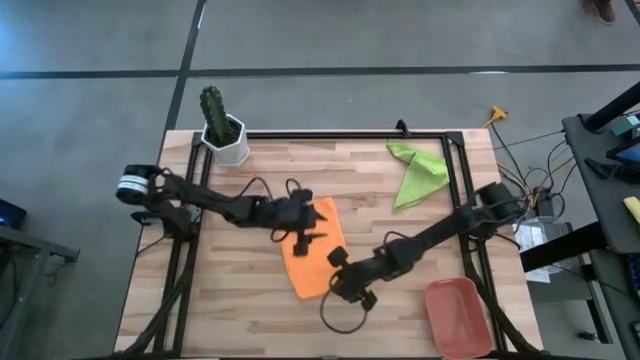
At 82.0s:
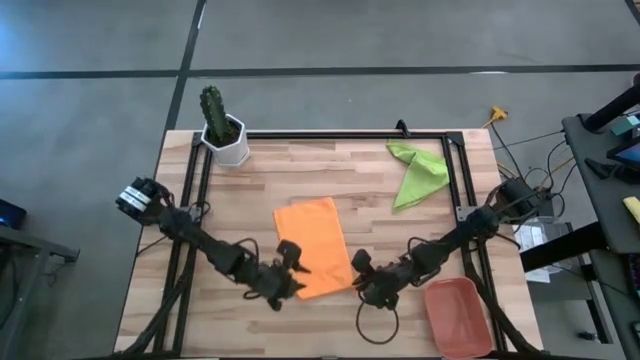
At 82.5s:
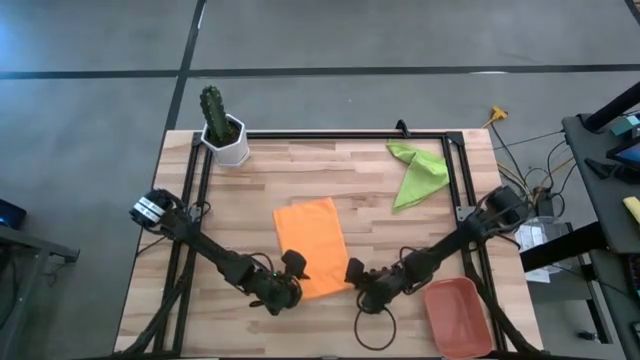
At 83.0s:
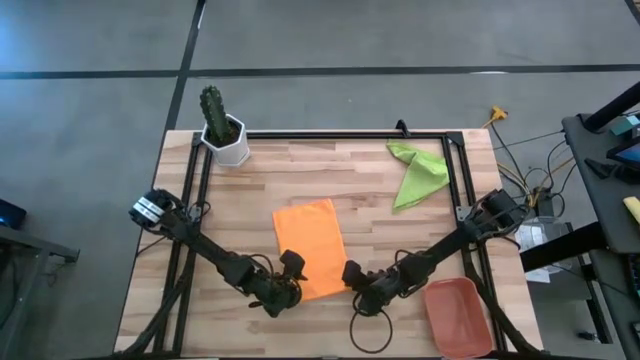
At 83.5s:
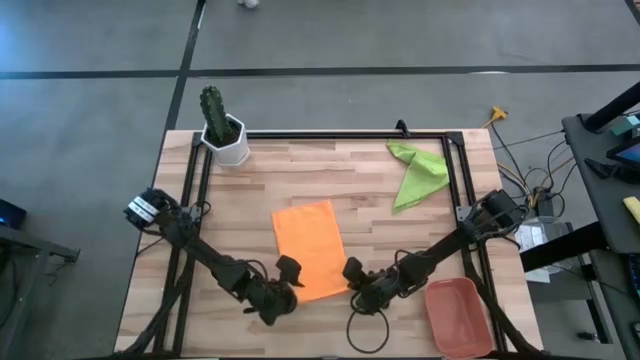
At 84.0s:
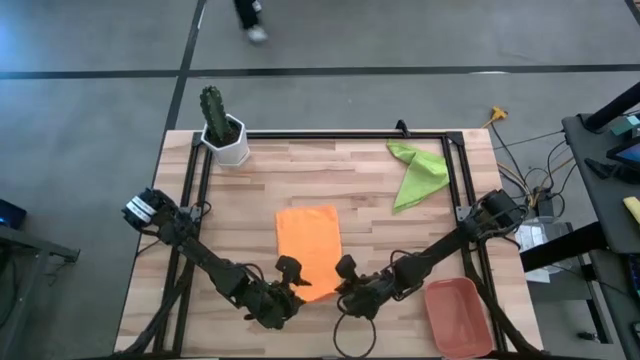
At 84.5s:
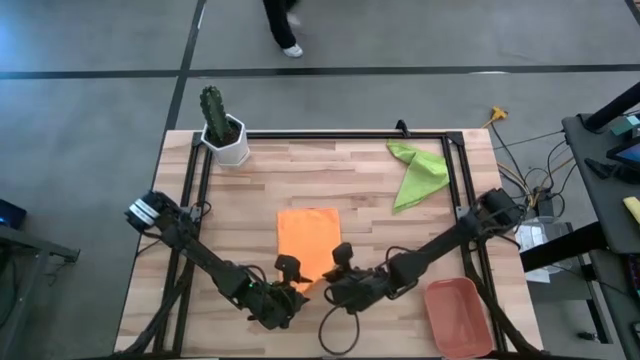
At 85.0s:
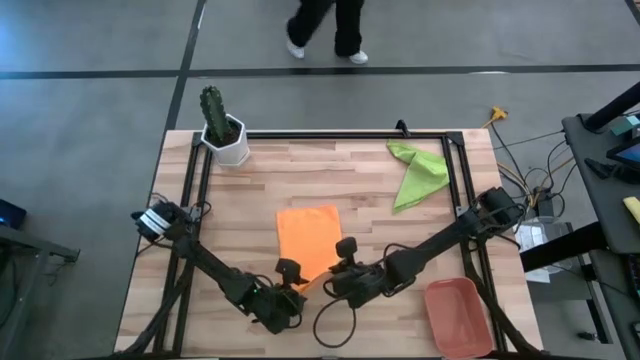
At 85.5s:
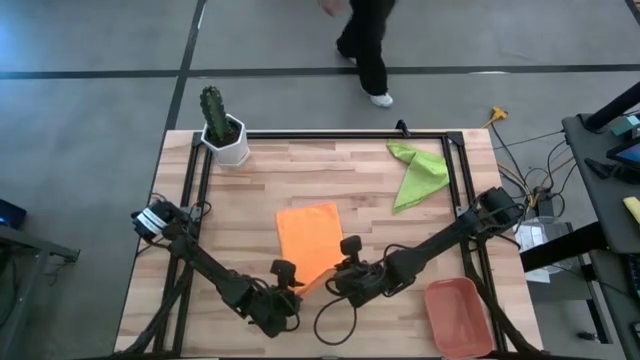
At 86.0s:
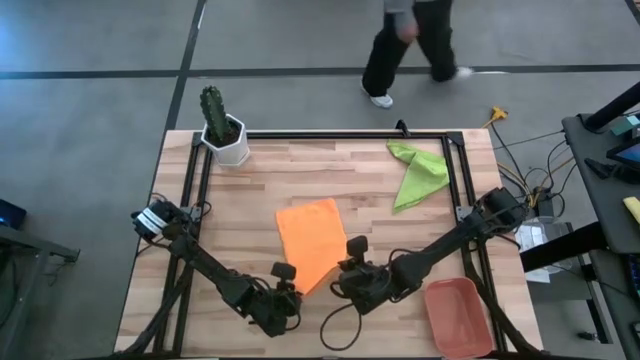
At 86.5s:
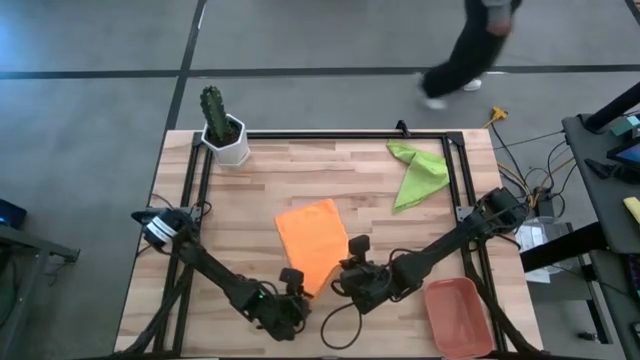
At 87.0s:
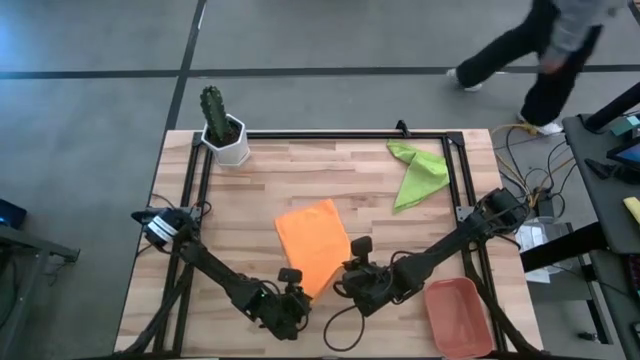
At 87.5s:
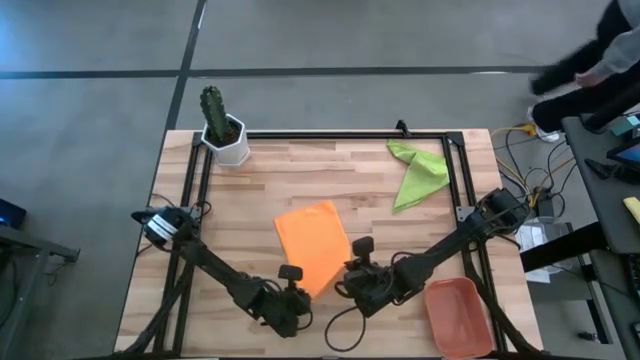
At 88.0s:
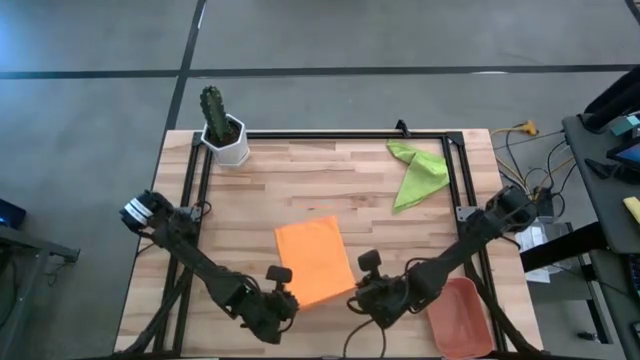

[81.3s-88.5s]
Task: Roll microfiber towels into tight, uniform cylinder then place into a basket
Fold the orange microfiber cloth

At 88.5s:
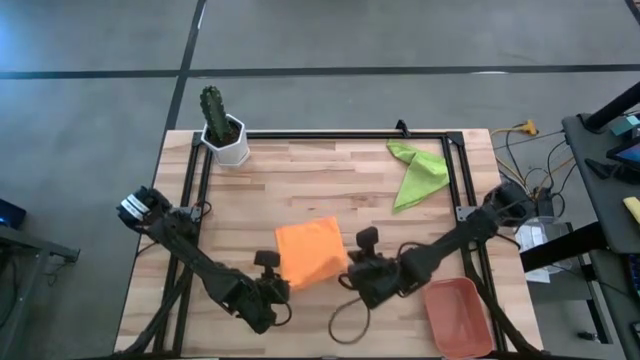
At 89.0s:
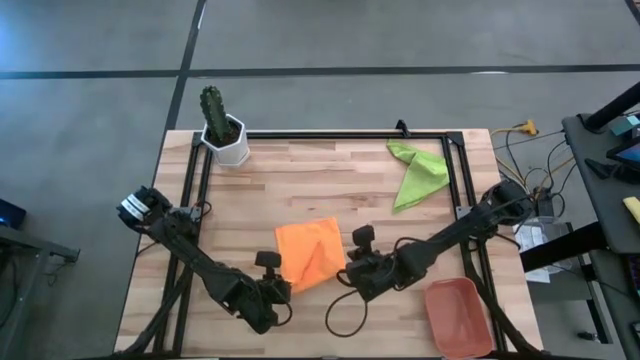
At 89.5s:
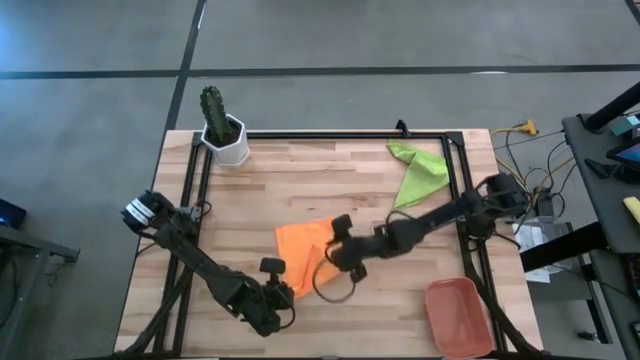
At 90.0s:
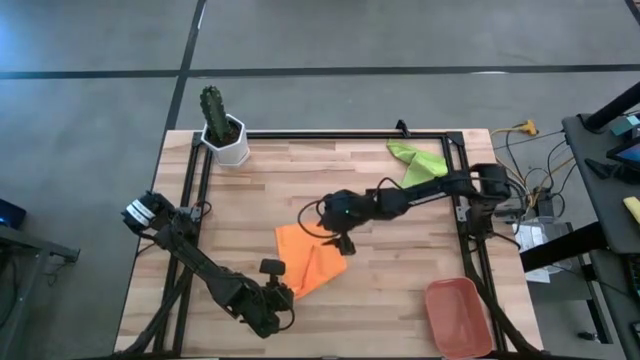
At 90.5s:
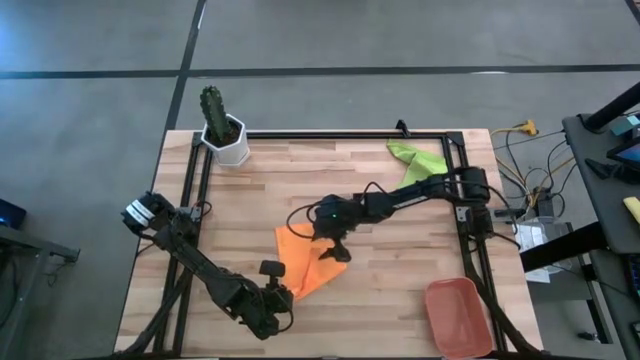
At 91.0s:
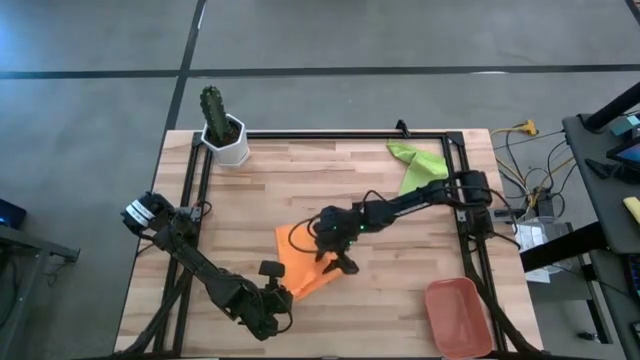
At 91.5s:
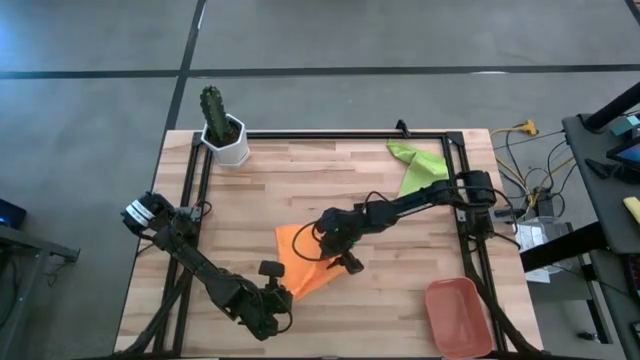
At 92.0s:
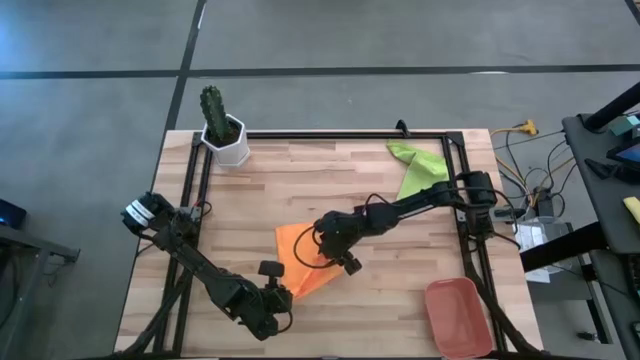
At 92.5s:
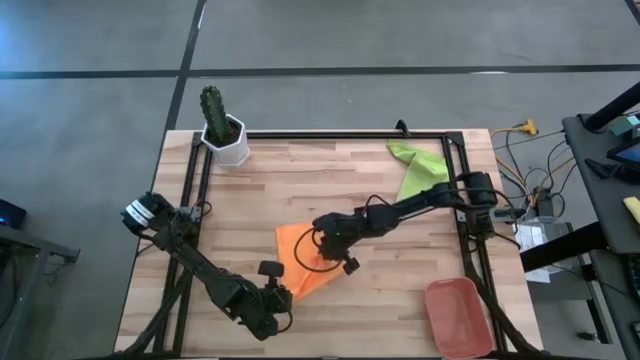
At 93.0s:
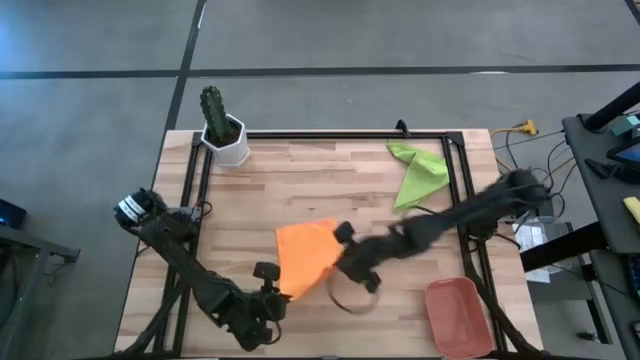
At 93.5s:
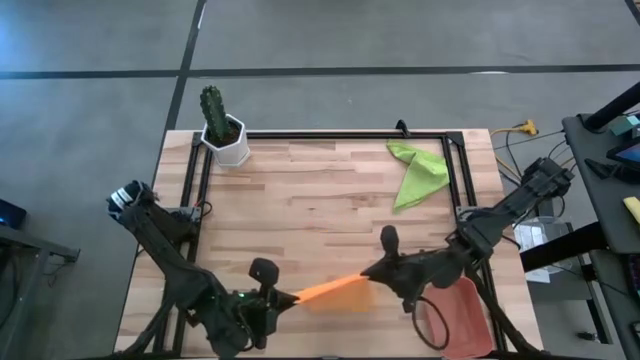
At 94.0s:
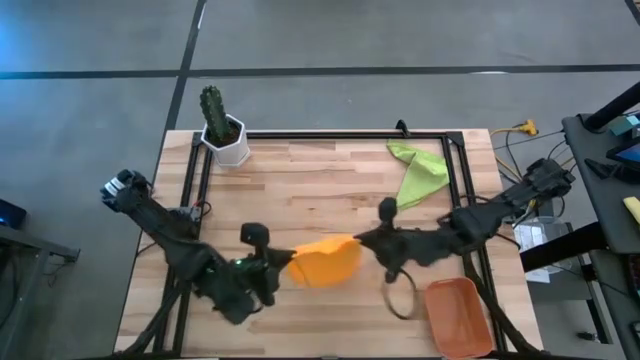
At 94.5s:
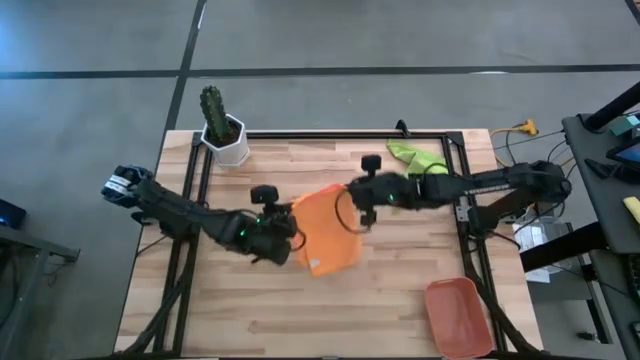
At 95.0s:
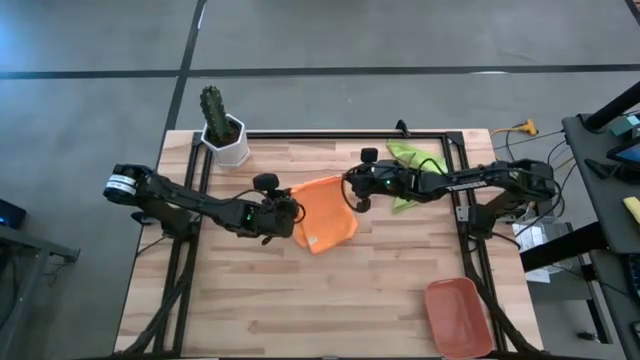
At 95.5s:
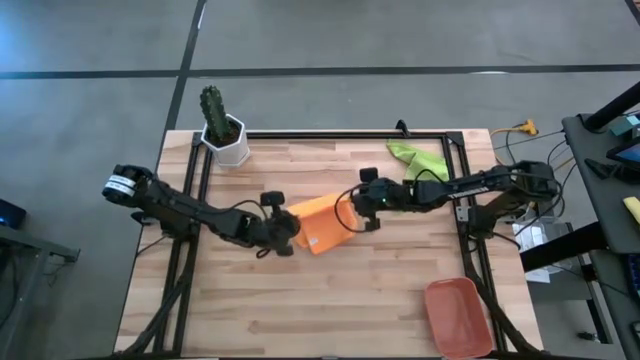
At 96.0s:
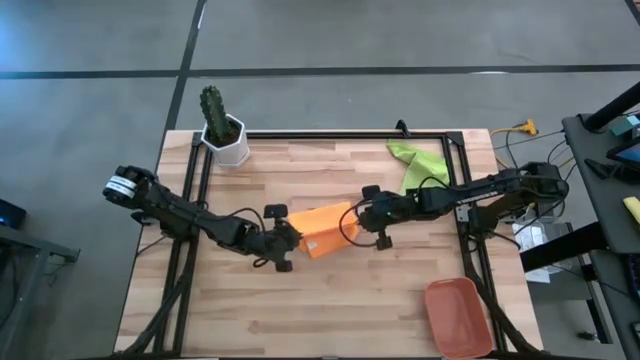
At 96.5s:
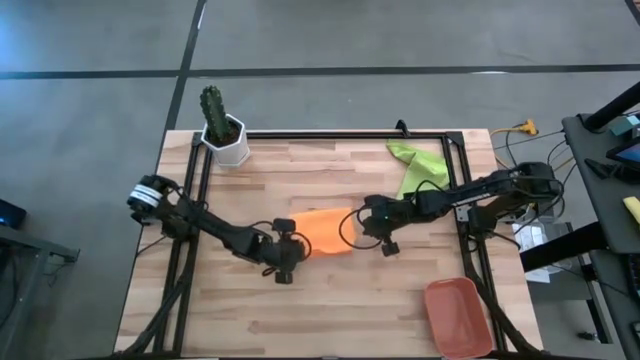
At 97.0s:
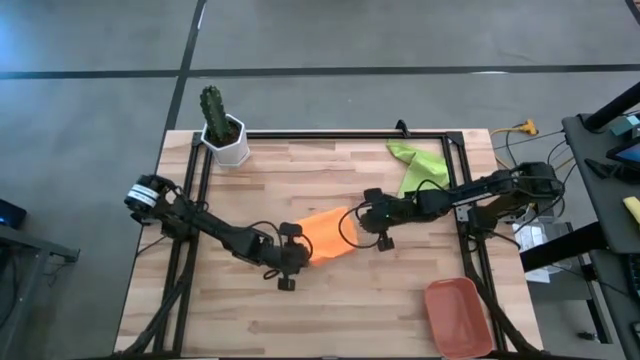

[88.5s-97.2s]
Fold the orange microfiber cloth

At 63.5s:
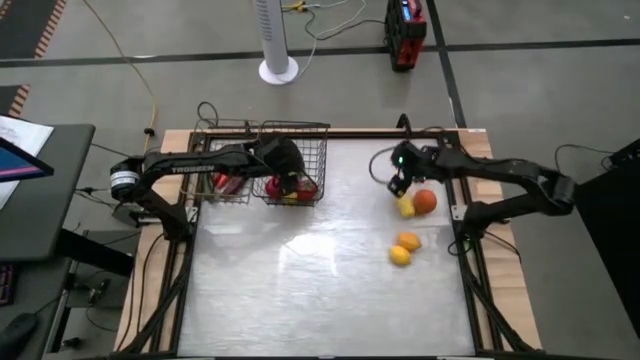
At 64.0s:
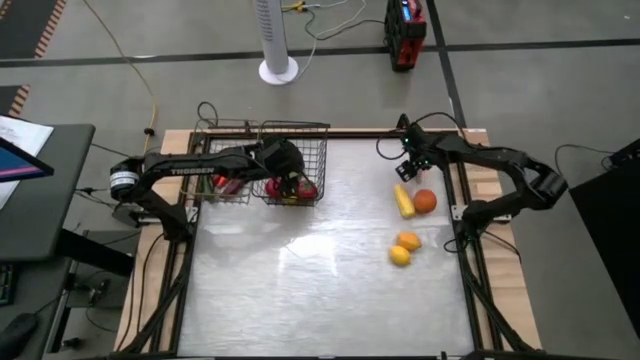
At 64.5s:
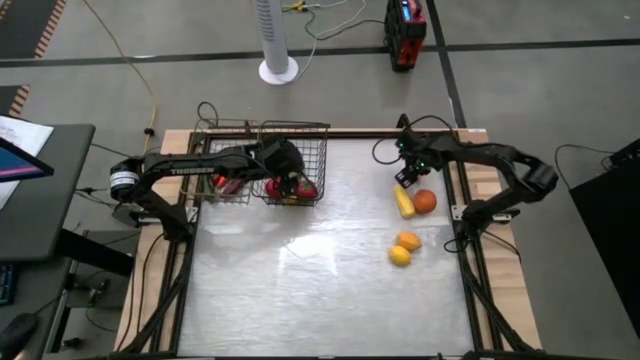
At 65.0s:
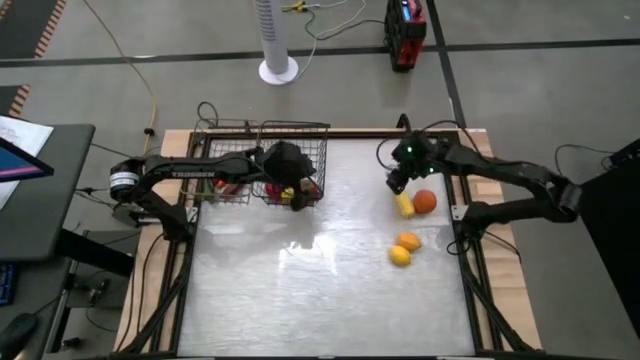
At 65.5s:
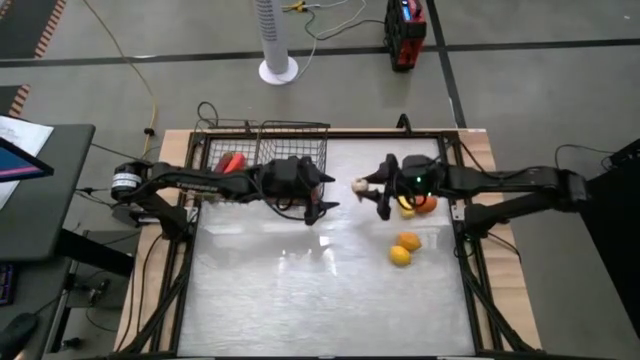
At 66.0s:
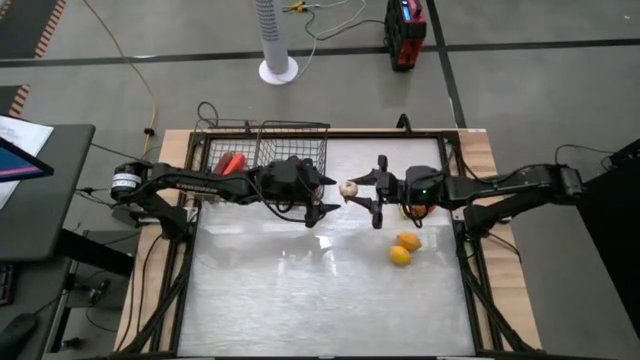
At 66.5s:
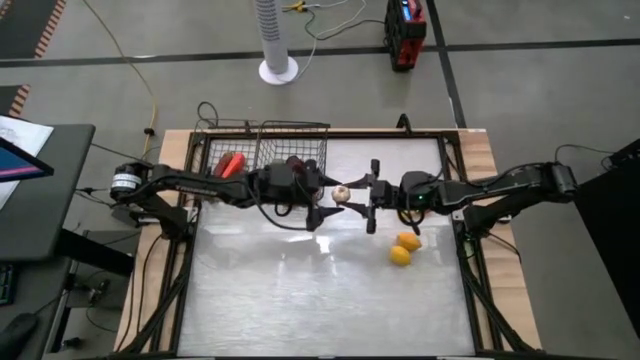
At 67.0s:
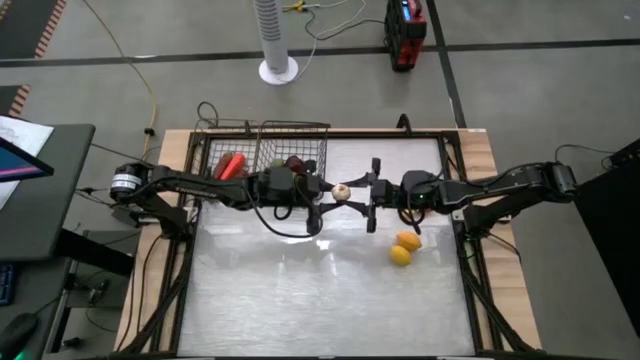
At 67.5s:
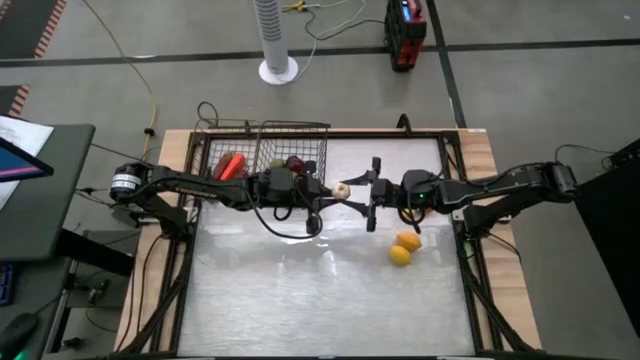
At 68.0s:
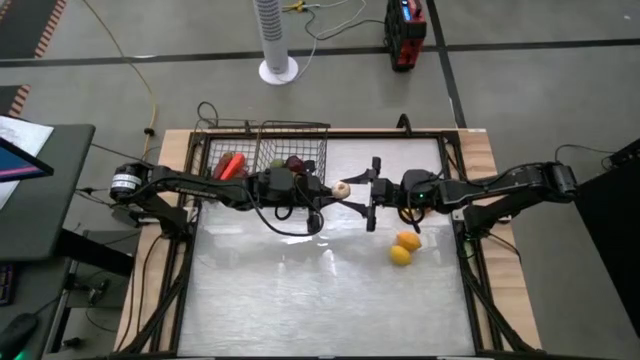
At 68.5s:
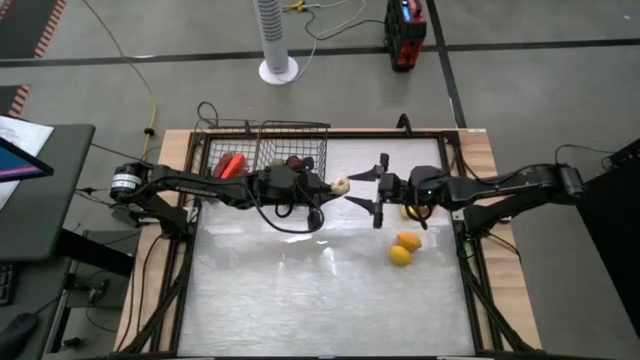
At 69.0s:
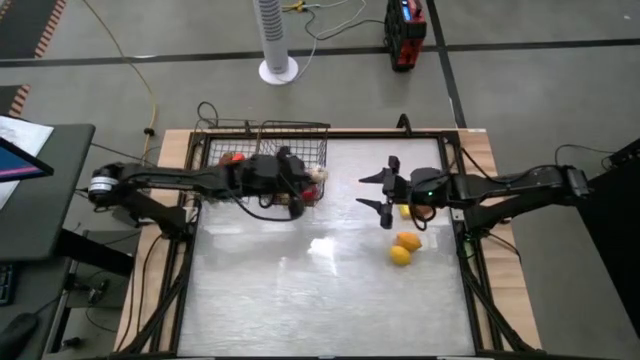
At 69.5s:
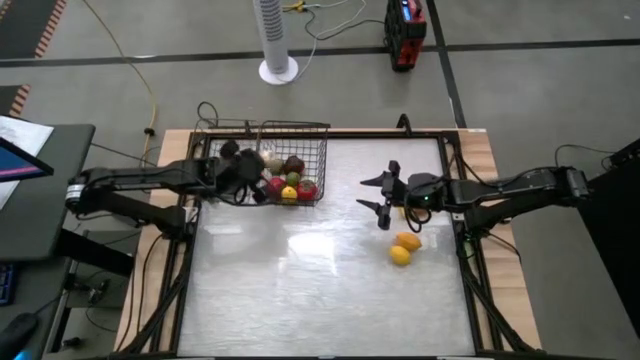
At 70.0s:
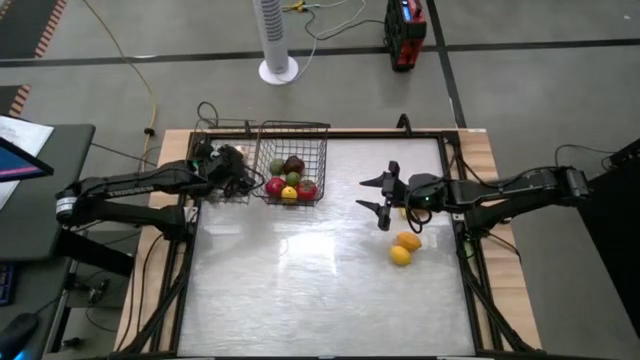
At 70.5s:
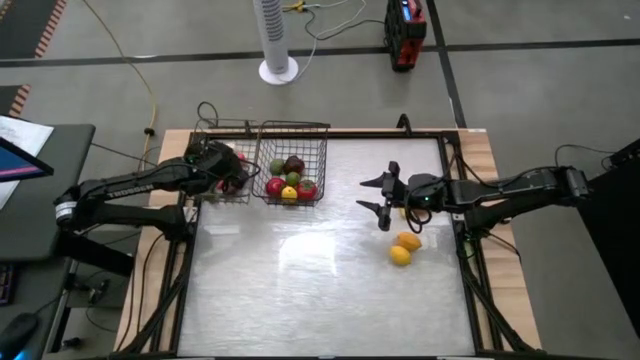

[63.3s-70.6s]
Task: Sort produce into baskets
Put the white garlic into the left wire basket
